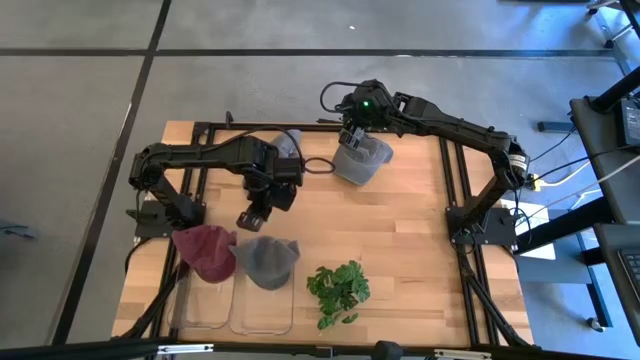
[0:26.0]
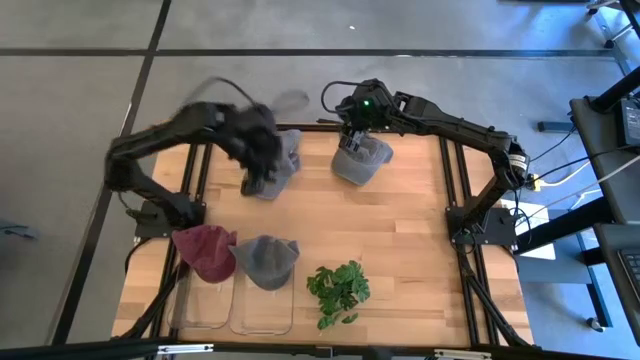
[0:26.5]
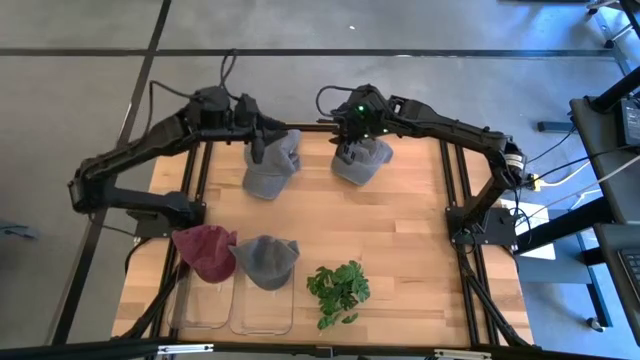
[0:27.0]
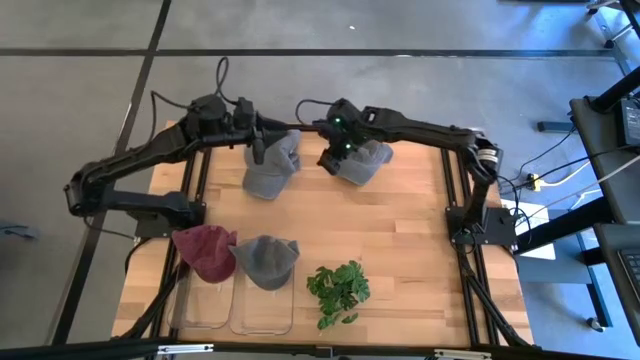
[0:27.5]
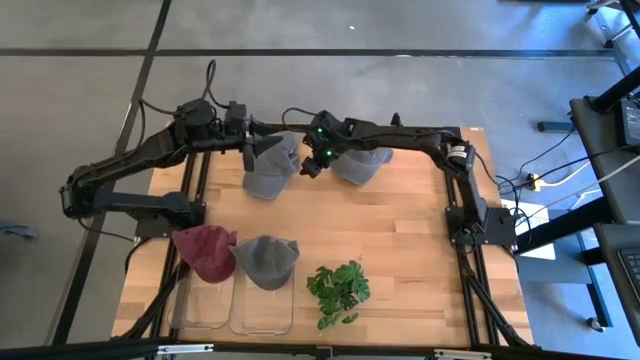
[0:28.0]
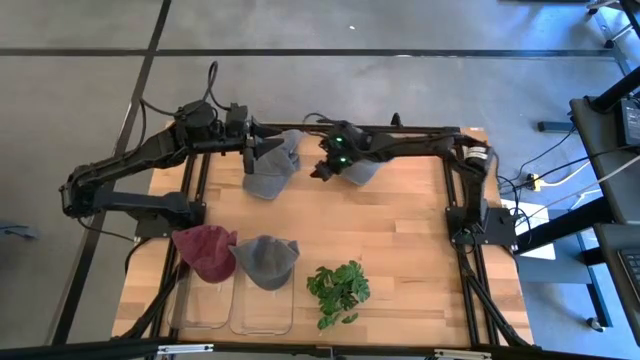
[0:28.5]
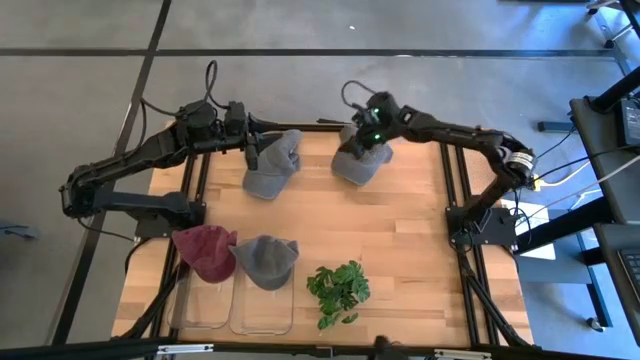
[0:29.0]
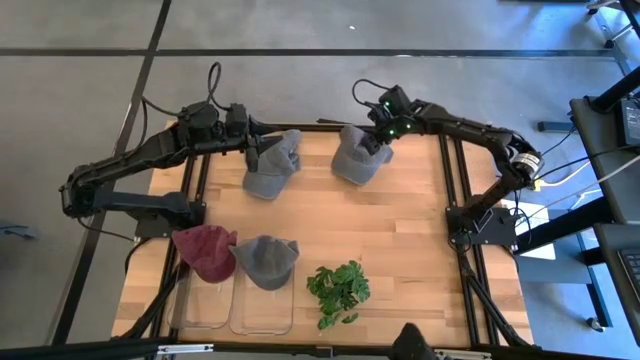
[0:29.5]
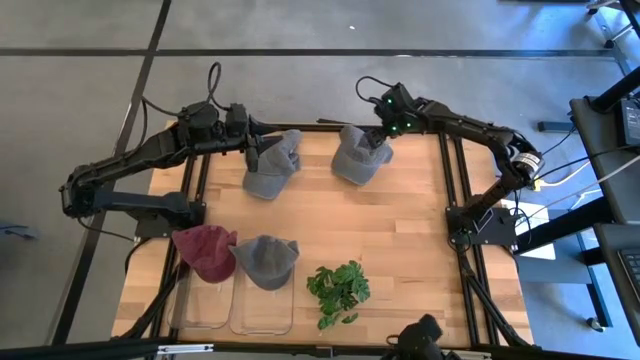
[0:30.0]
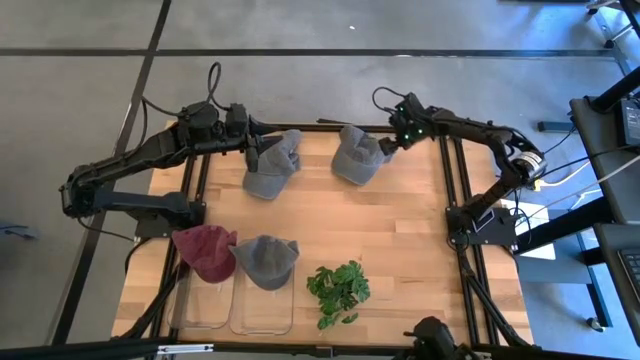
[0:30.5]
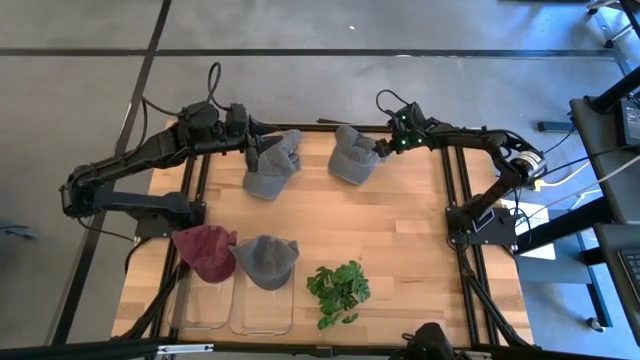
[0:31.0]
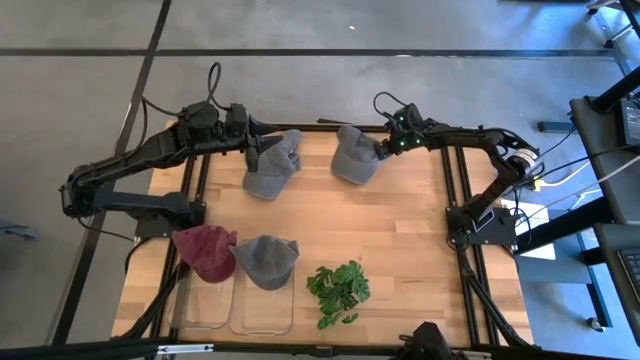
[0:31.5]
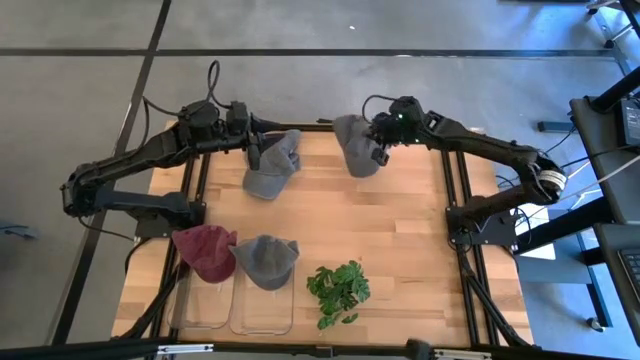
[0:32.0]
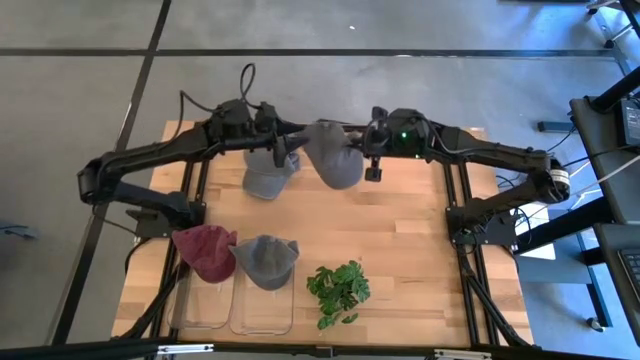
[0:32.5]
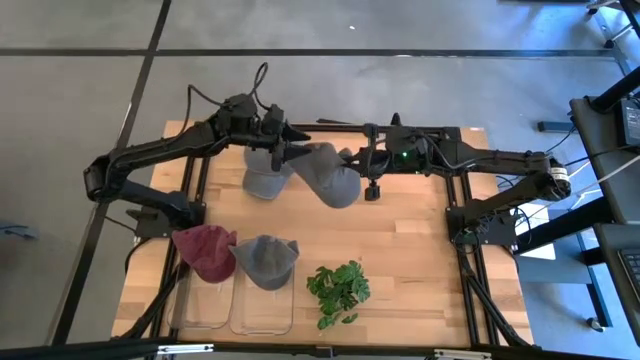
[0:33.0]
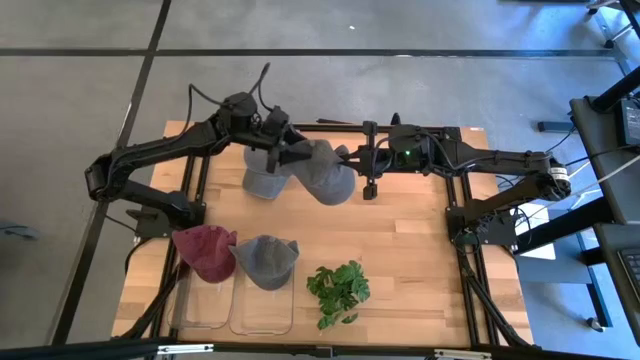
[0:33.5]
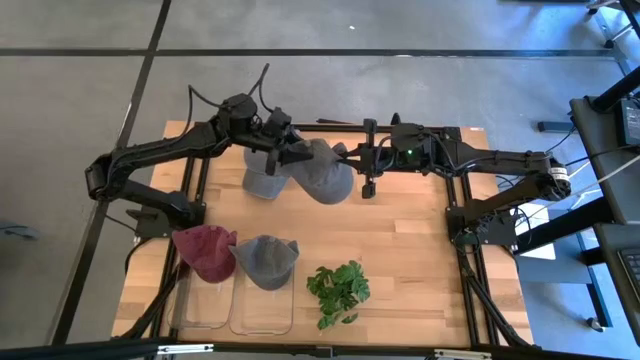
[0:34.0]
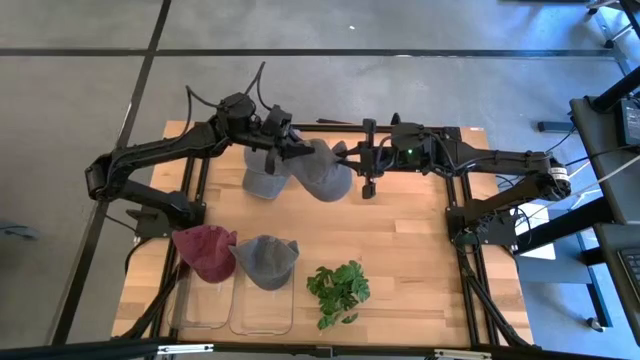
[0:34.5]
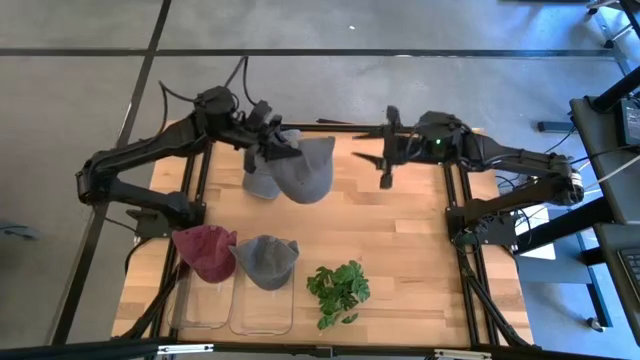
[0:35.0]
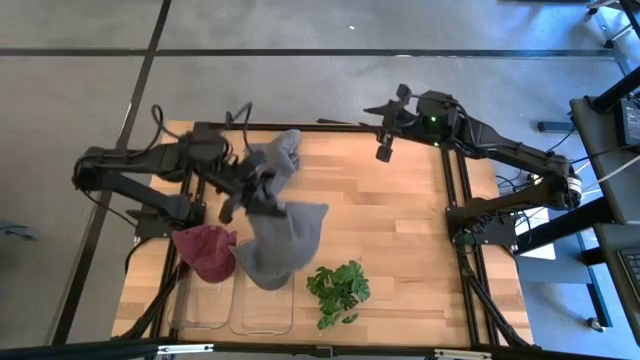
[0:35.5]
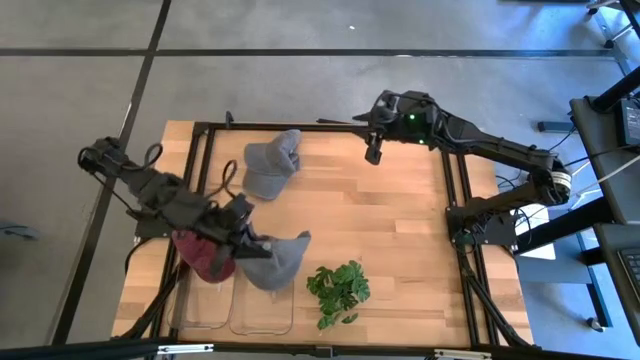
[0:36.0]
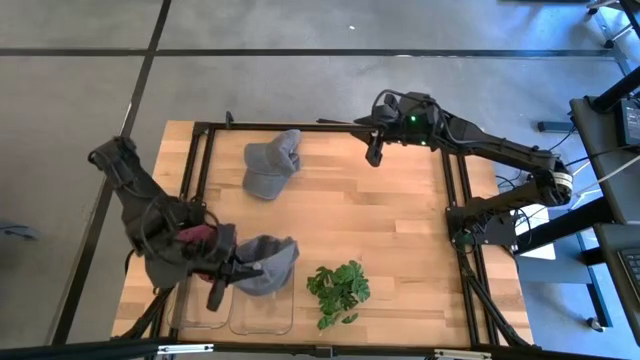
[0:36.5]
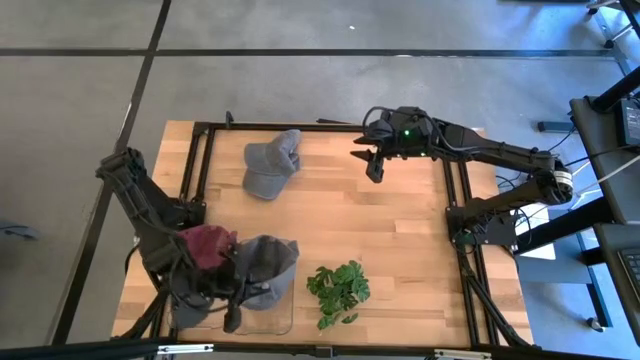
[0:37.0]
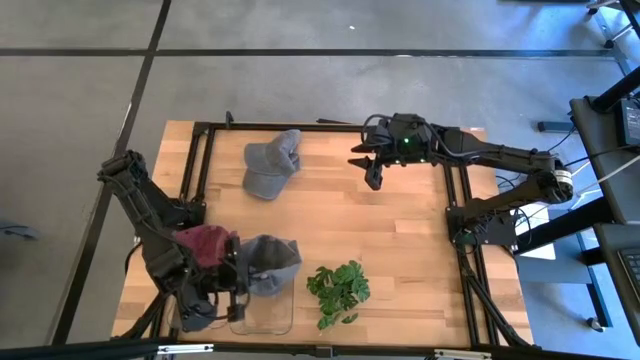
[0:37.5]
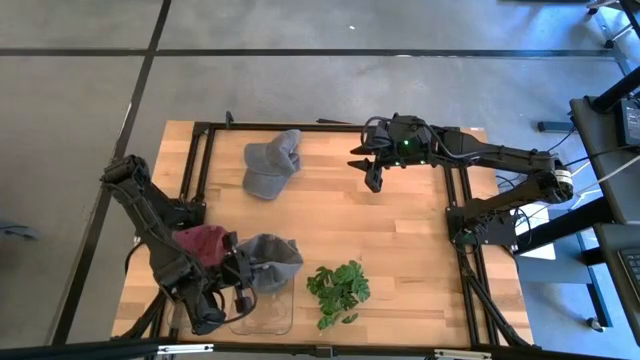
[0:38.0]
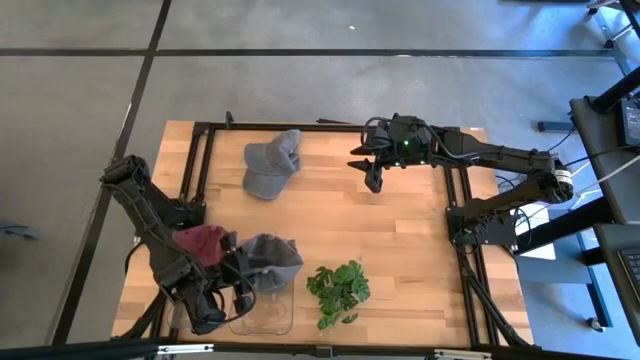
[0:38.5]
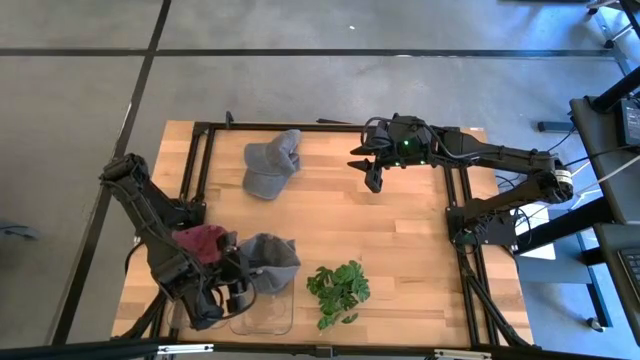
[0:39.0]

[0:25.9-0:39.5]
Task: Pick & Place hat
Put the gray cap into the right transparent bin

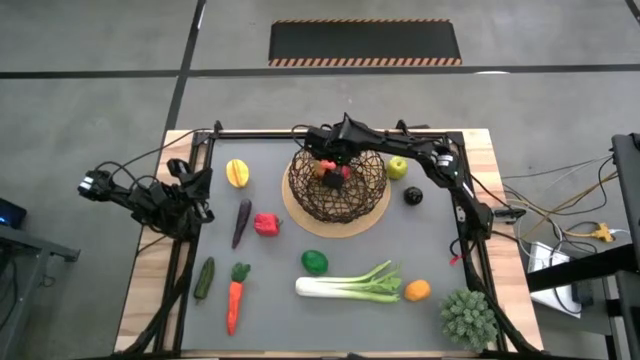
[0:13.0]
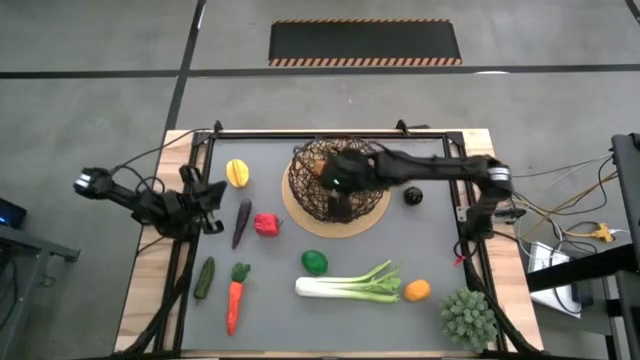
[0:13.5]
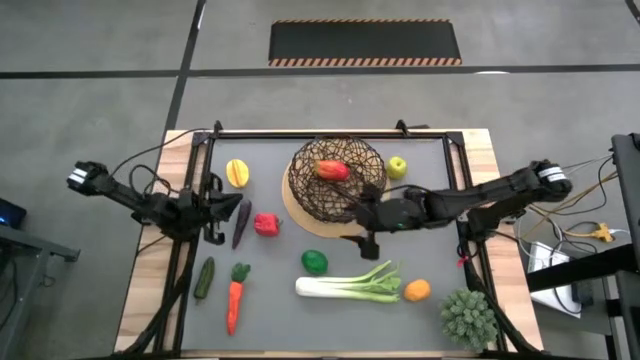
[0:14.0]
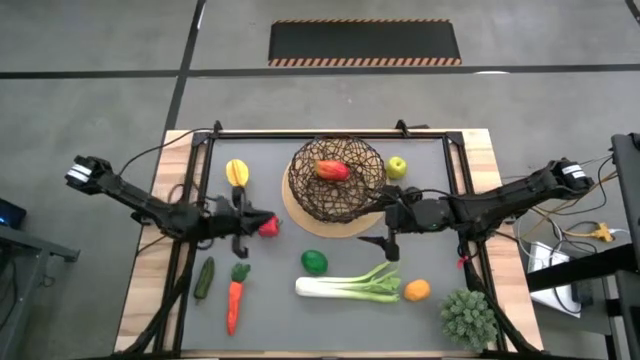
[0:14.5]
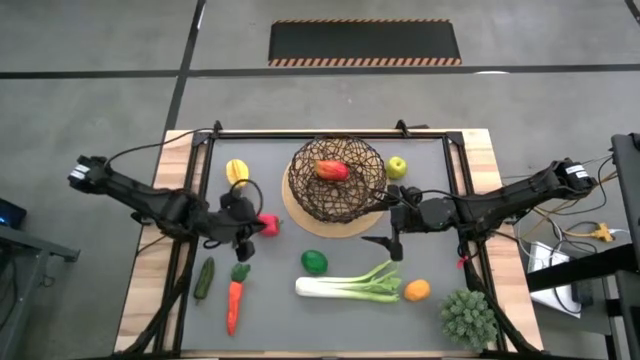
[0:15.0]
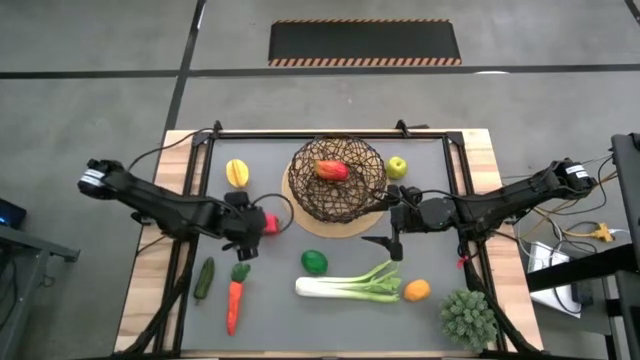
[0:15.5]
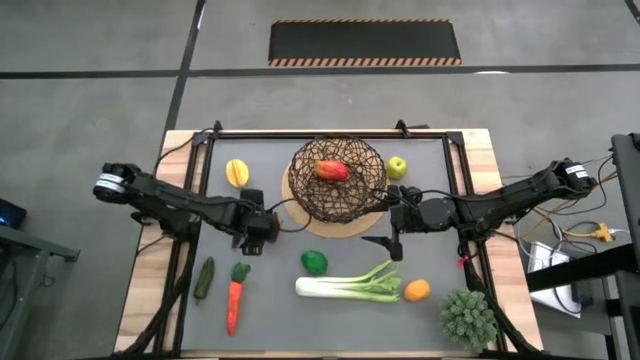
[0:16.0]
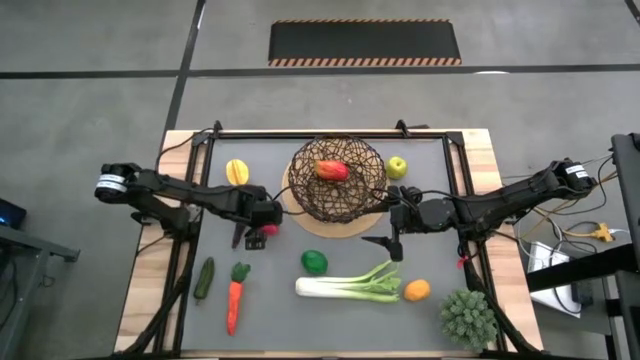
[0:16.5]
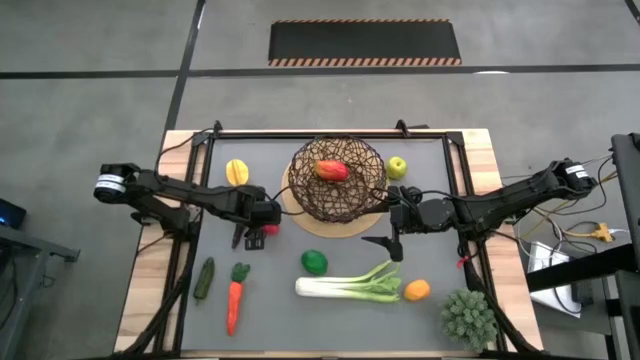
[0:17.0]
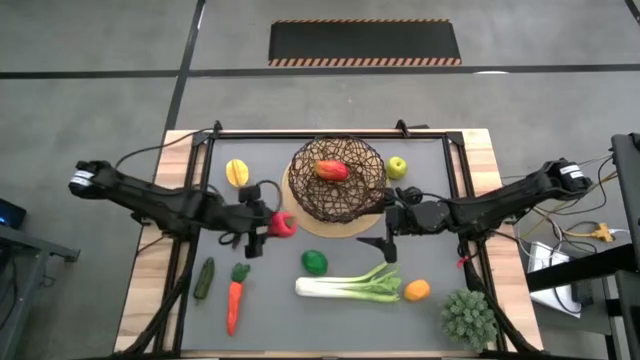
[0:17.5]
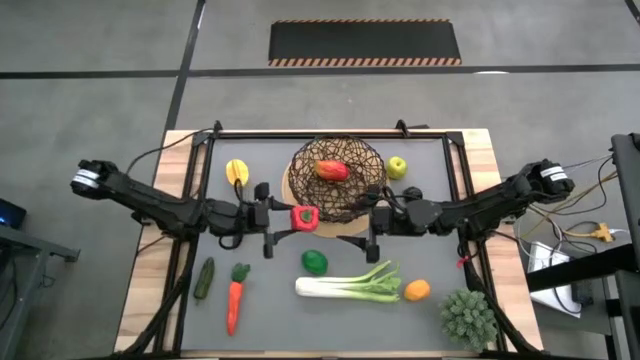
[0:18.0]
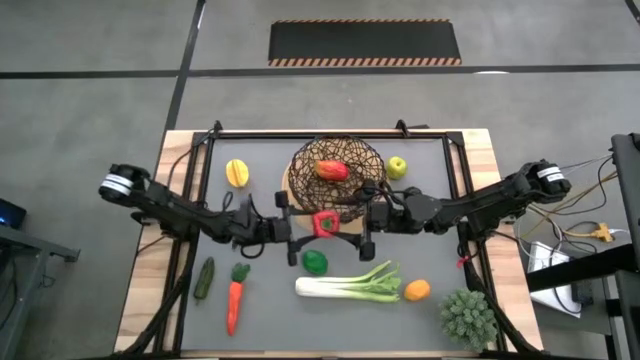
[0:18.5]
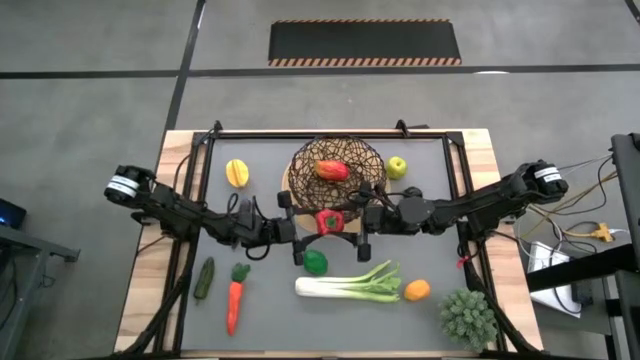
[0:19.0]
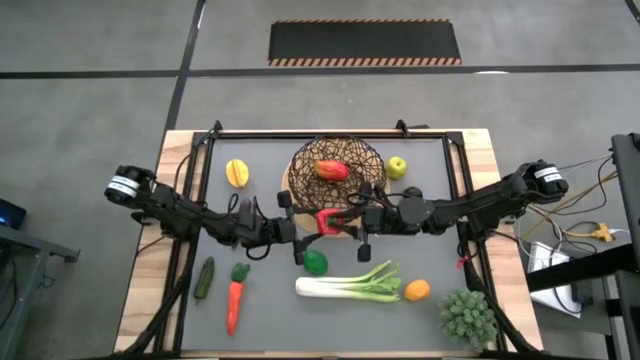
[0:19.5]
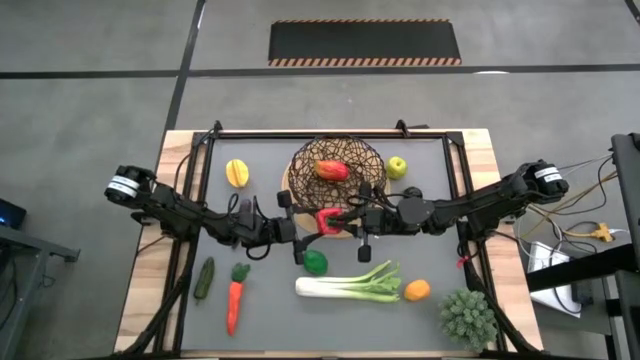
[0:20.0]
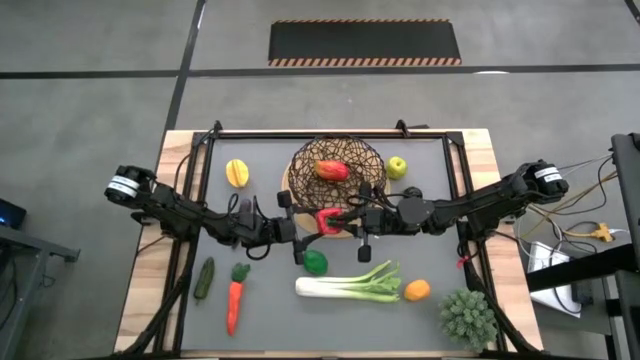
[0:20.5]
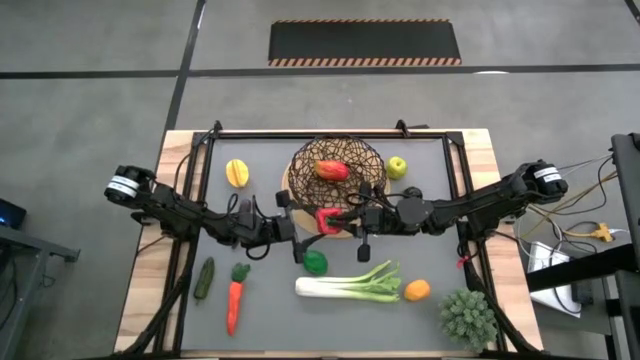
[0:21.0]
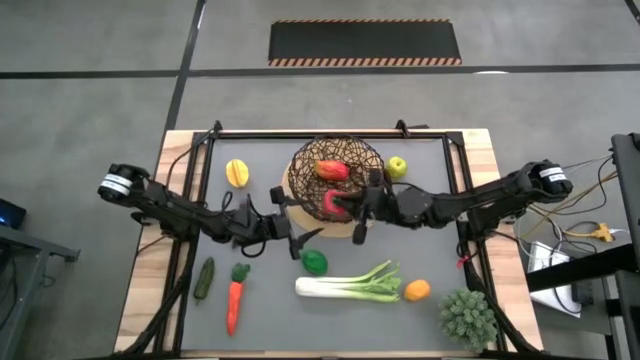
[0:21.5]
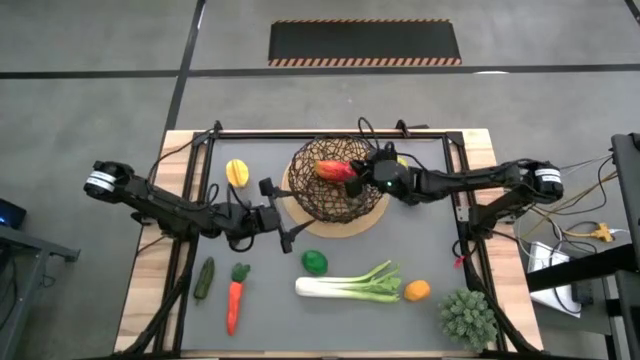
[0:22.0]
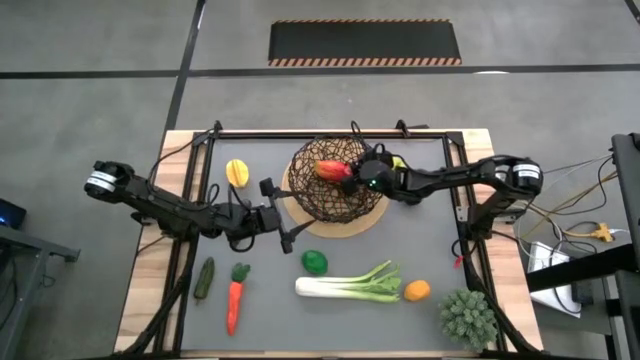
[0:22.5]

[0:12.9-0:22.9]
Task: Build produce basket
Put the bell pepper into the basket
